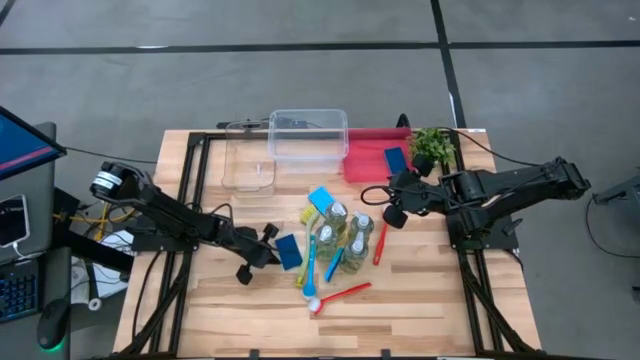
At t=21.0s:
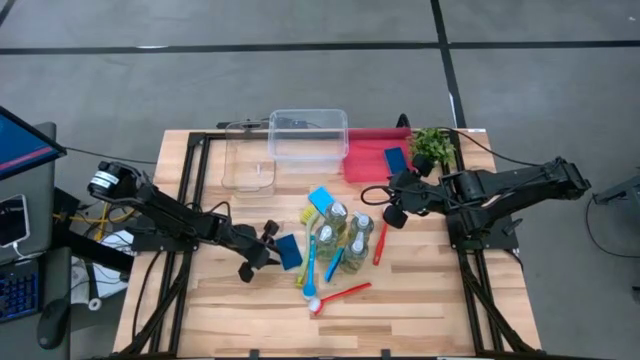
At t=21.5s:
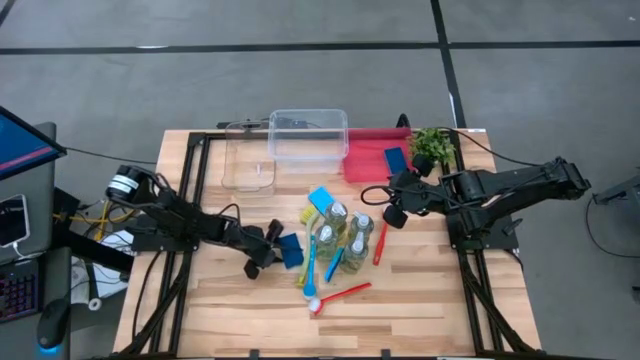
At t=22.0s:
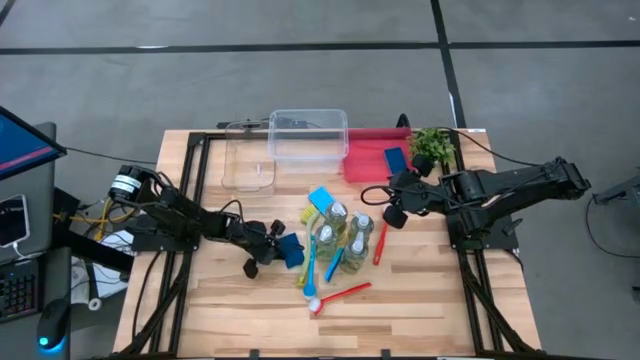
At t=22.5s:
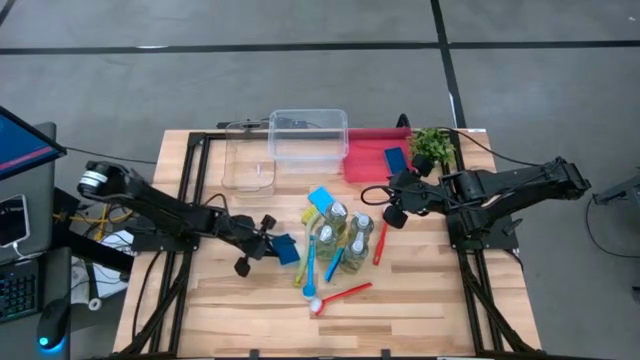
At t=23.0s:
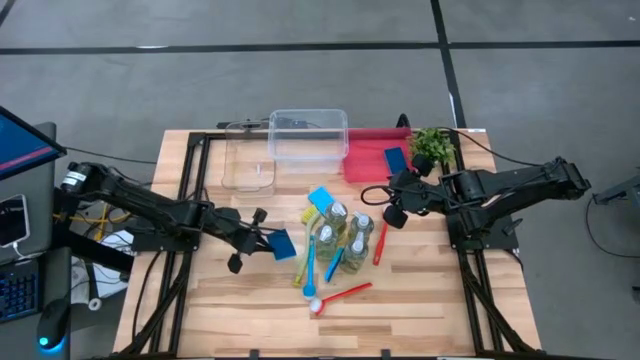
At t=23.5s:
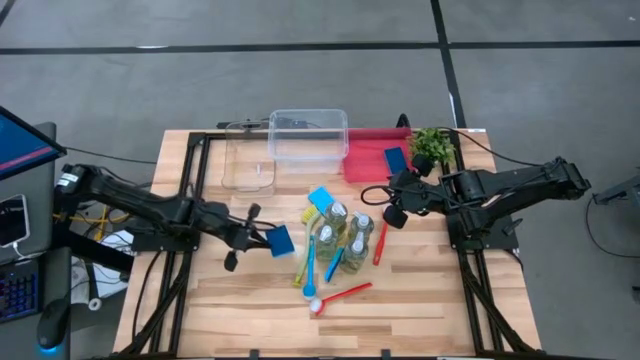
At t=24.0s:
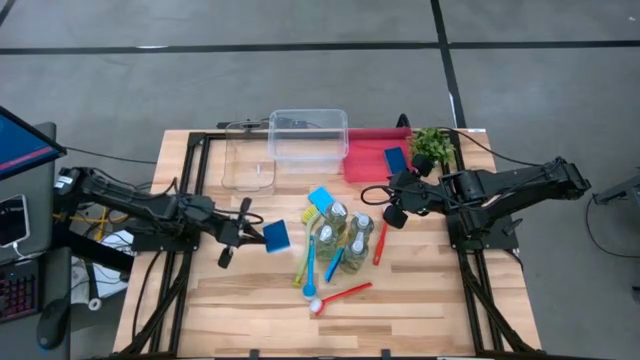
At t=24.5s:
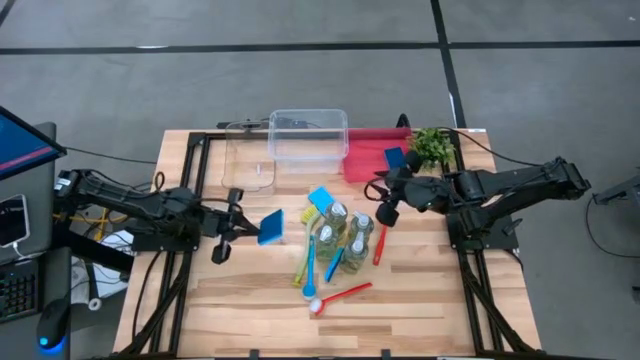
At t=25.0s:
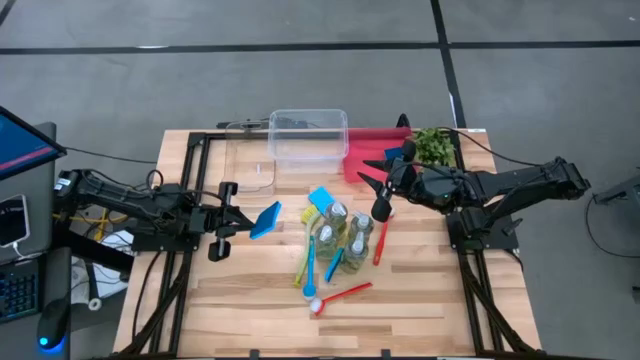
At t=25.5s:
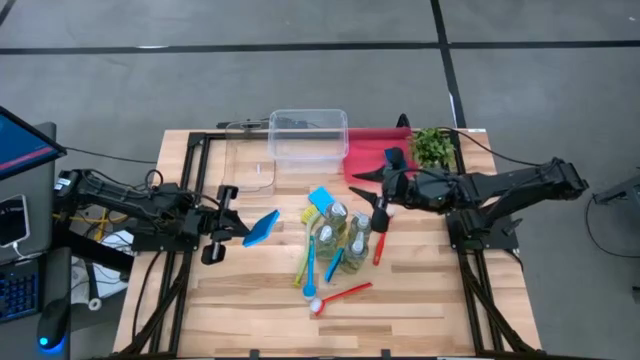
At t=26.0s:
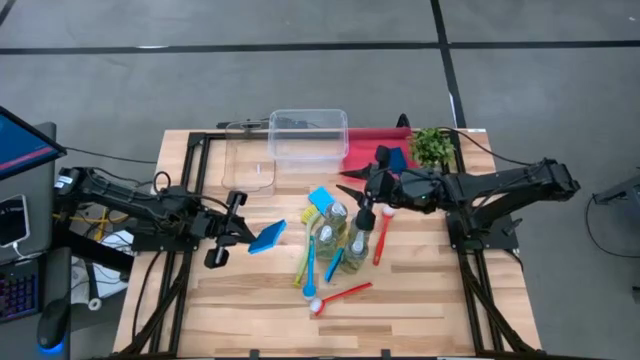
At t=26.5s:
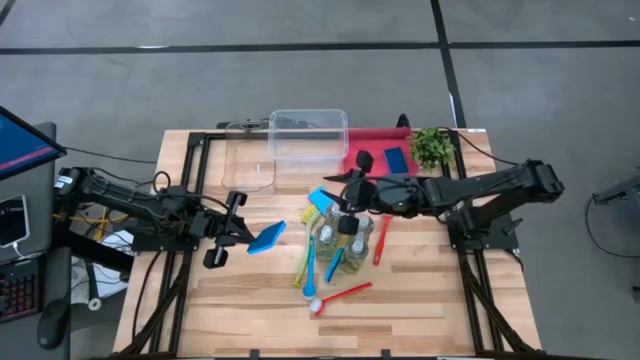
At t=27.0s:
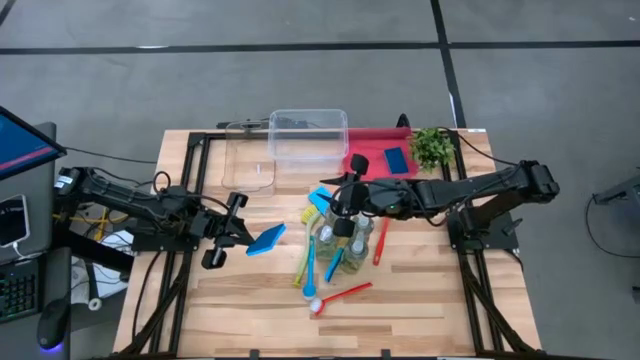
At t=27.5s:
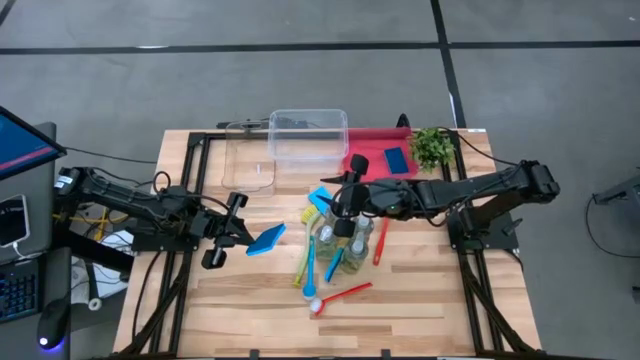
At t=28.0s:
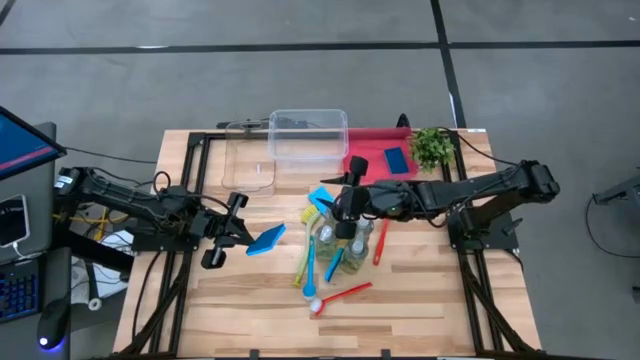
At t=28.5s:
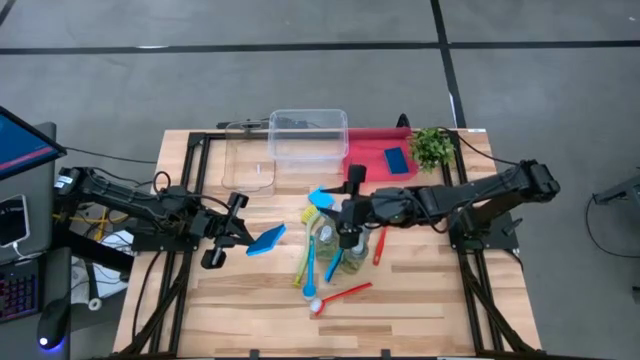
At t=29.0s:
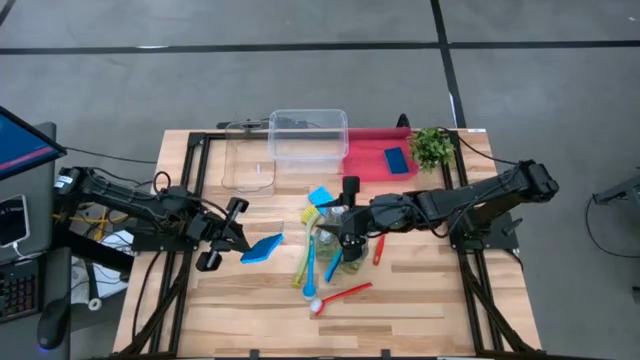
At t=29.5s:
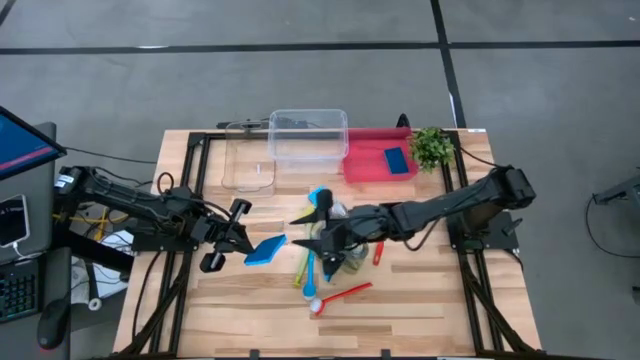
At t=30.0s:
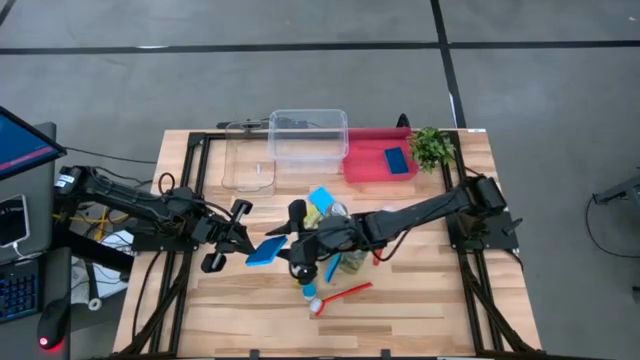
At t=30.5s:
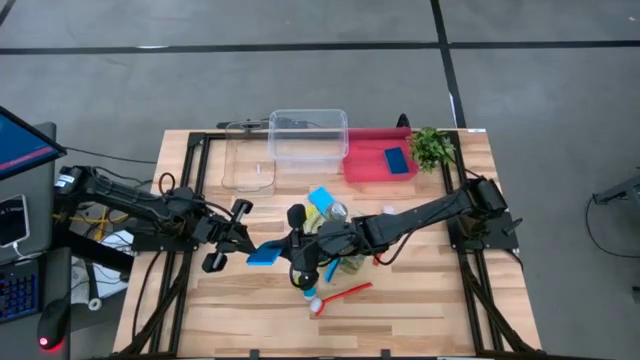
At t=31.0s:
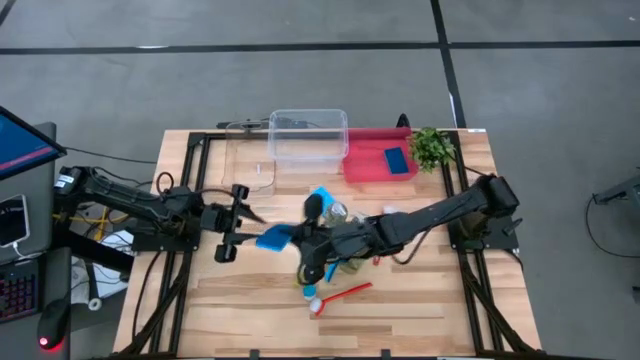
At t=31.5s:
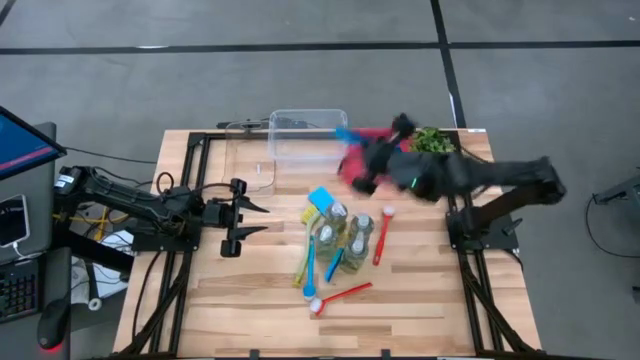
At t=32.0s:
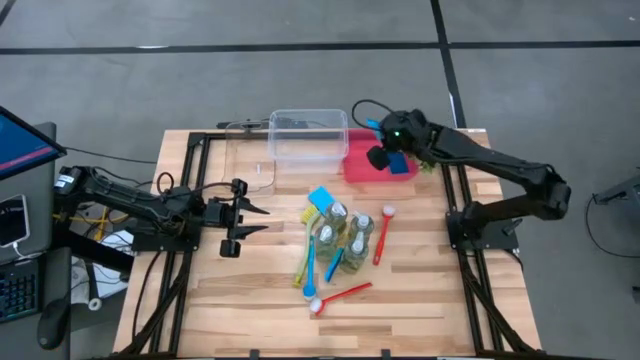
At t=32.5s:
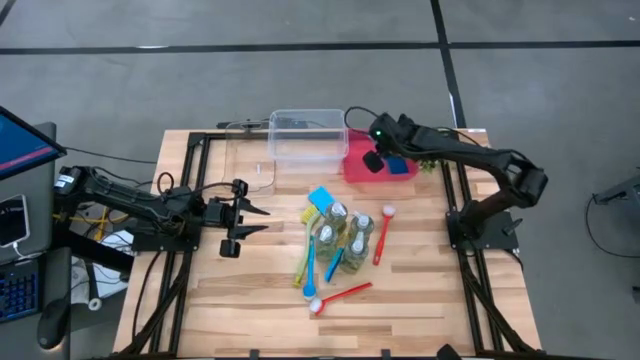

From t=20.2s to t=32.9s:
Task: Pick & Place Kitchen Sink Supplies
Put the blue sponge into the red bin

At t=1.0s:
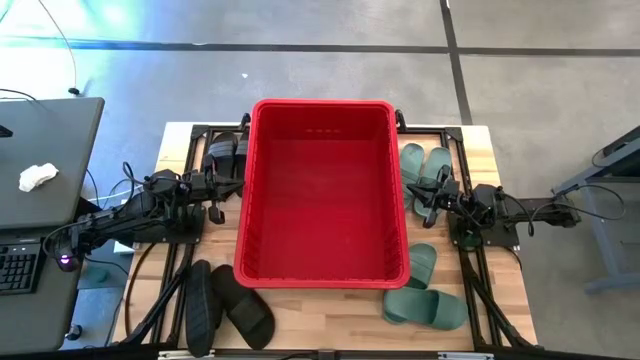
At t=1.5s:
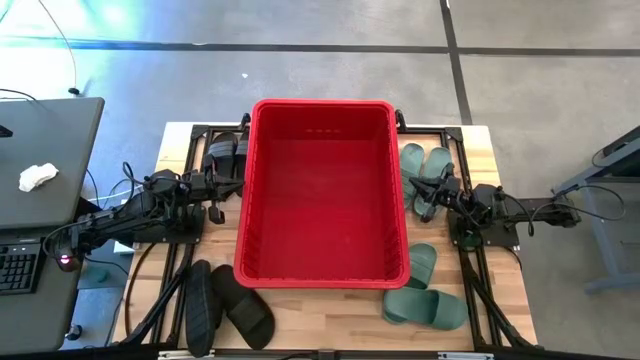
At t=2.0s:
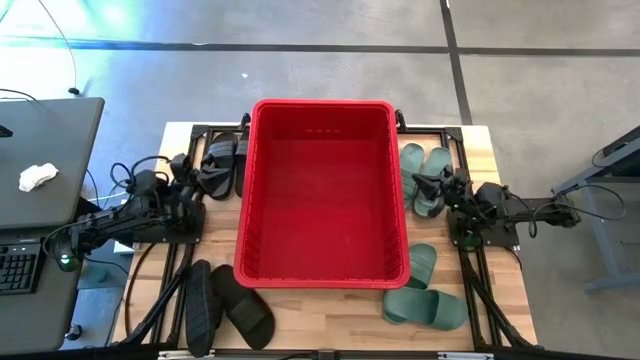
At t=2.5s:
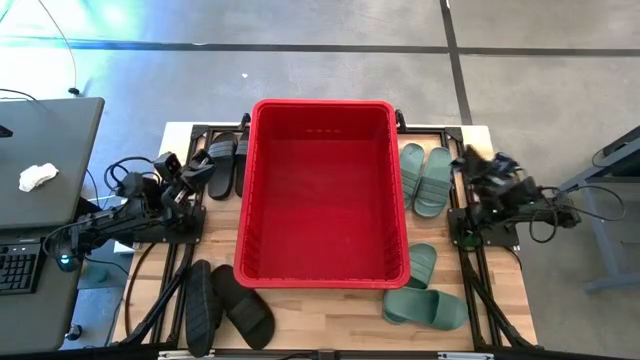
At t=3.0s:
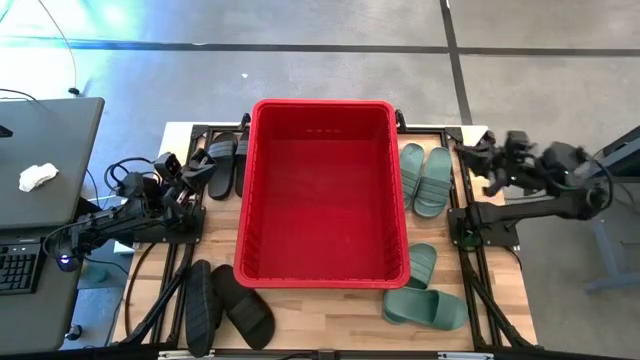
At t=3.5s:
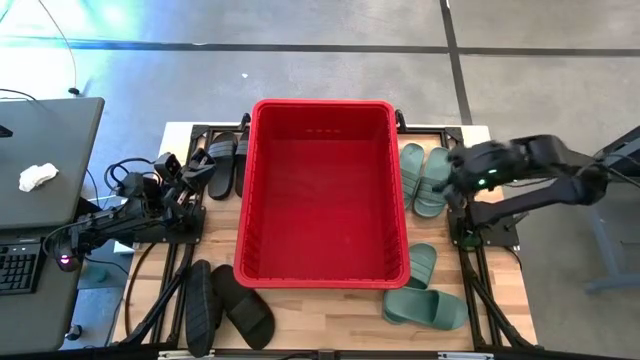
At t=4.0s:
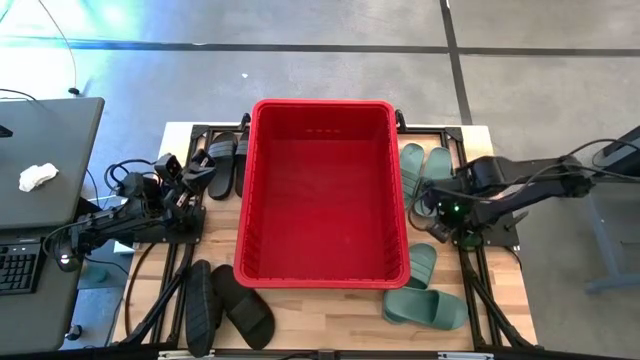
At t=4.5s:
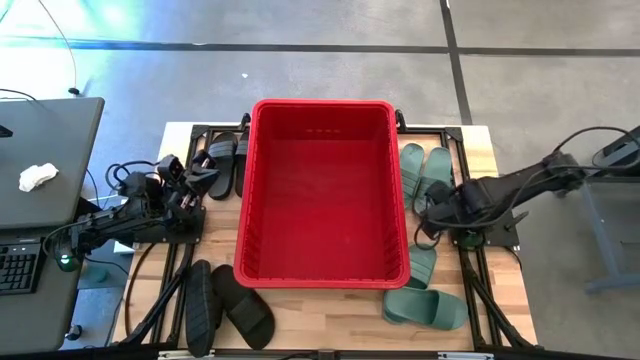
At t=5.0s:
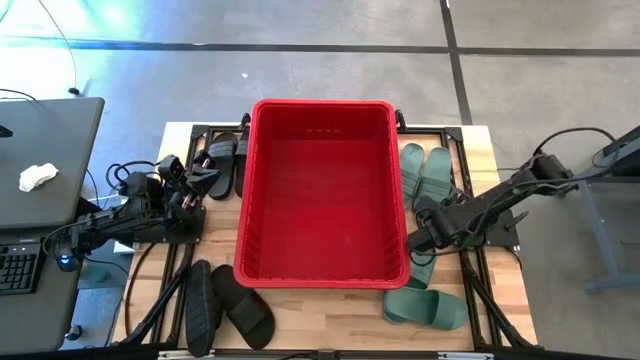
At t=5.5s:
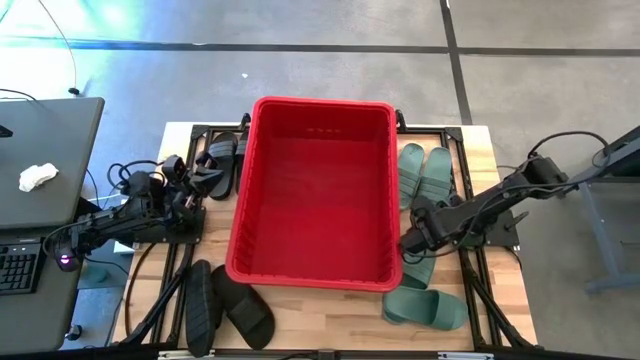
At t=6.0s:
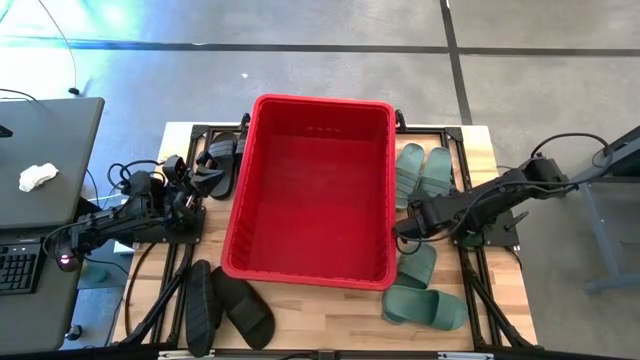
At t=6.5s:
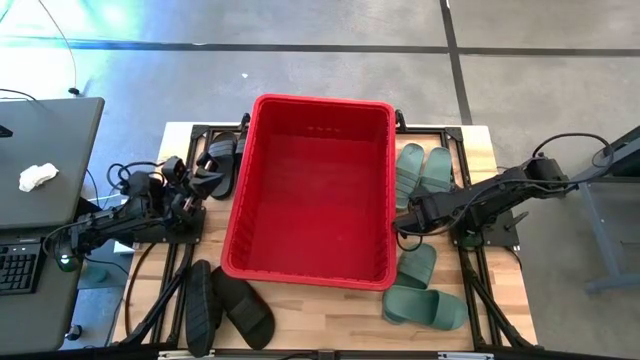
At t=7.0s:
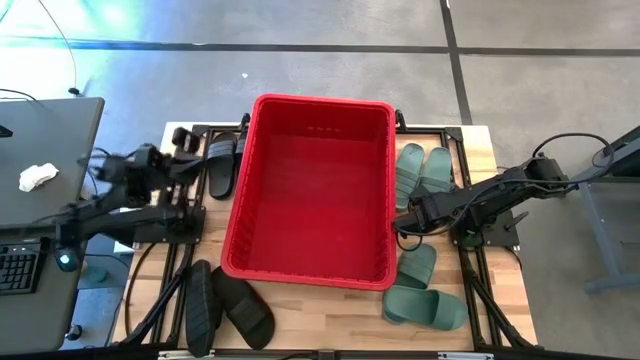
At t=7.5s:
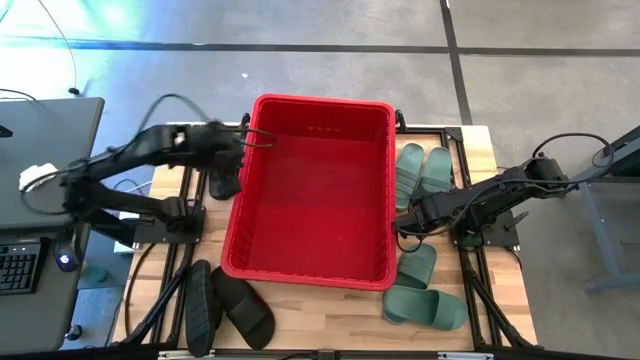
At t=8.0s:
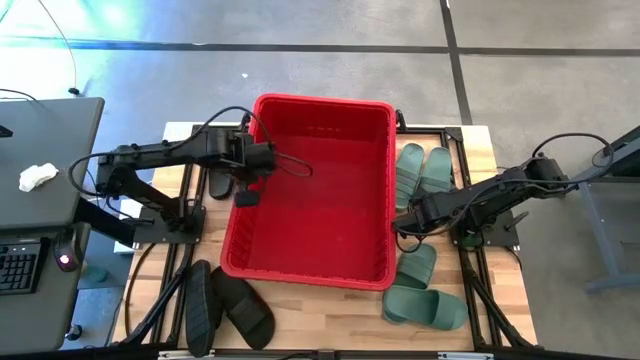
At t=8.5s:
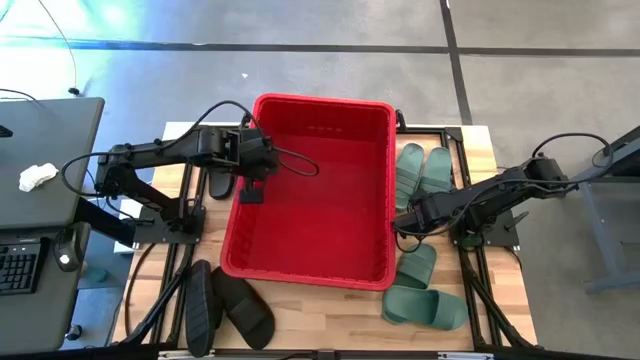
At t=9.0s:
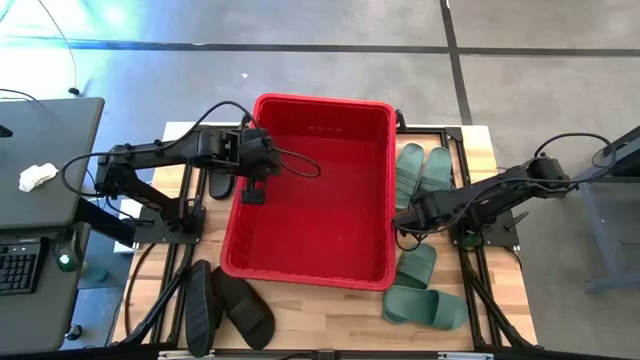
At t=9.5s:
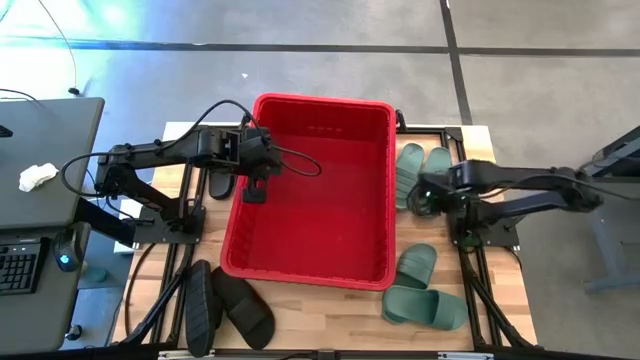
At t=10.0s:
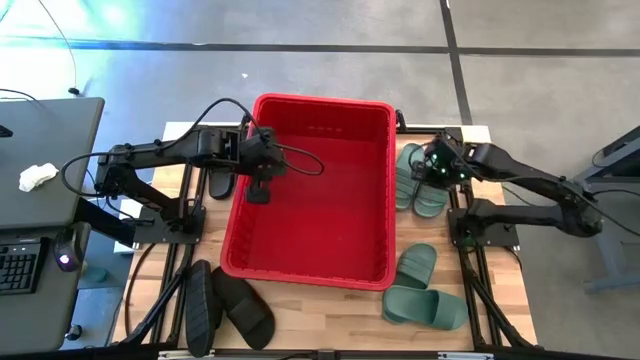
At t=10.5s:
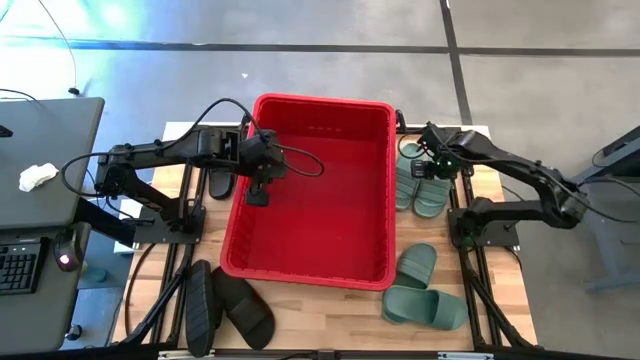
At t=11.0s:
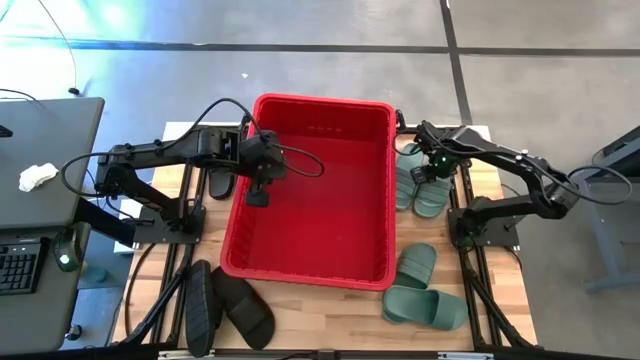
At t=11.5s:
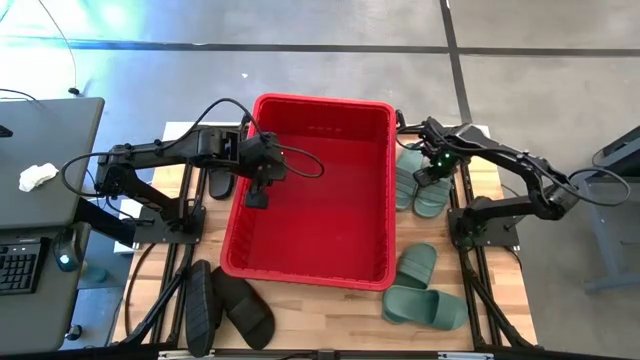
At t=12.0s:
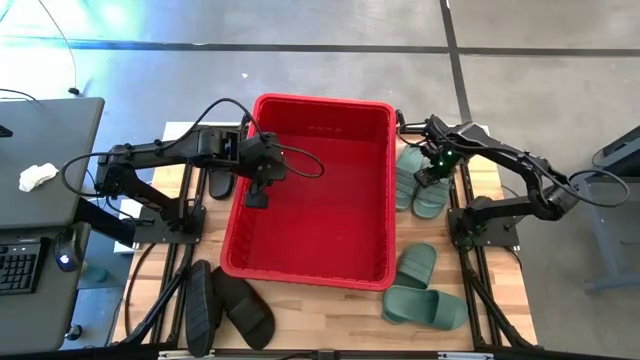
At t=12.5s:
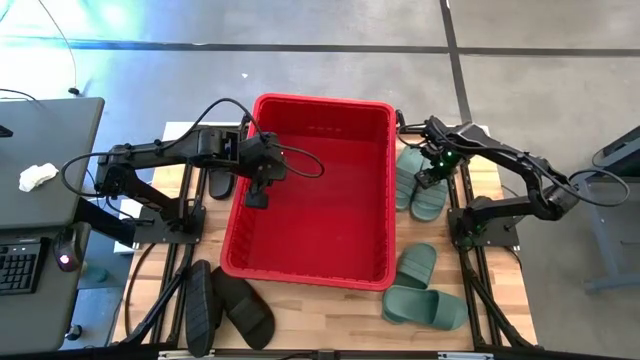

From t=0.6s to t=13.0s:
Task: Pick and place slides into bin
Put the green slide into the red container
